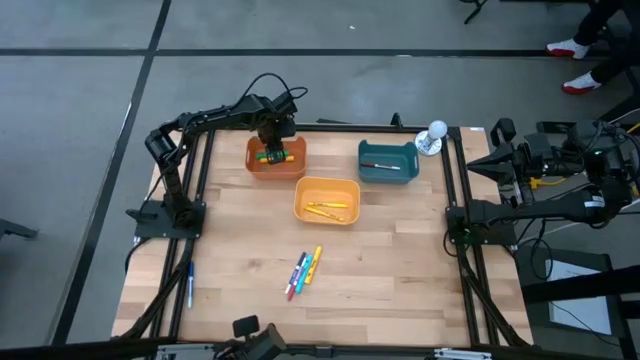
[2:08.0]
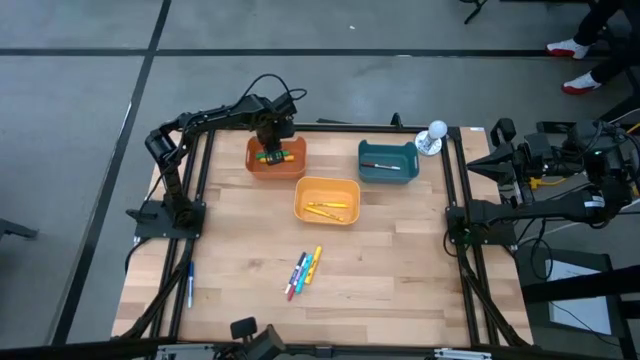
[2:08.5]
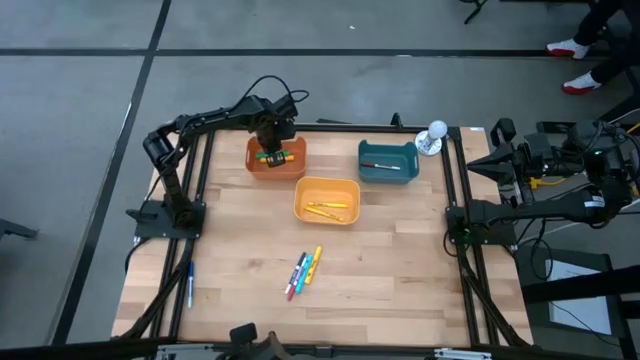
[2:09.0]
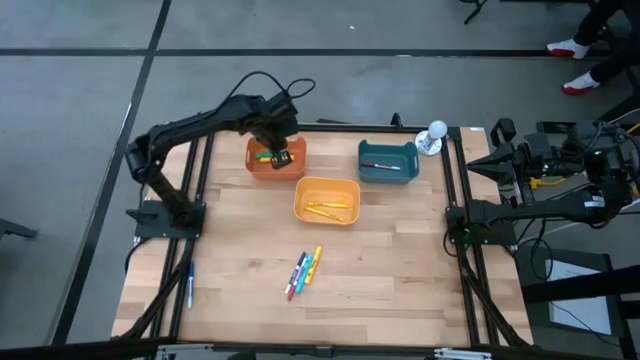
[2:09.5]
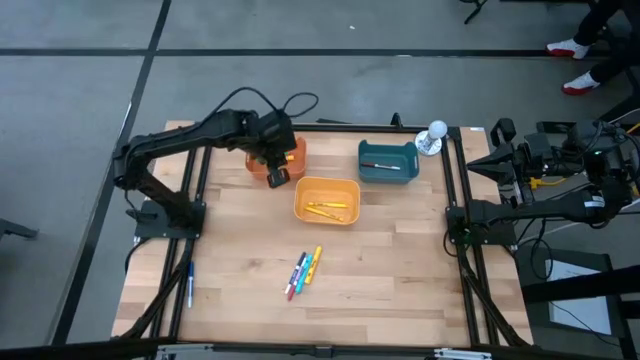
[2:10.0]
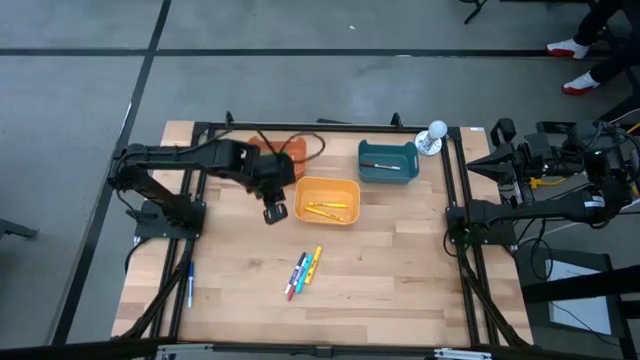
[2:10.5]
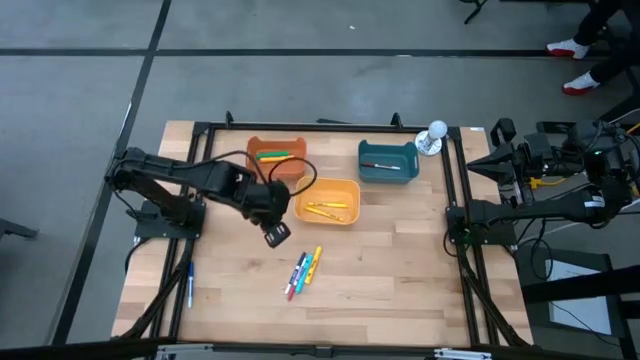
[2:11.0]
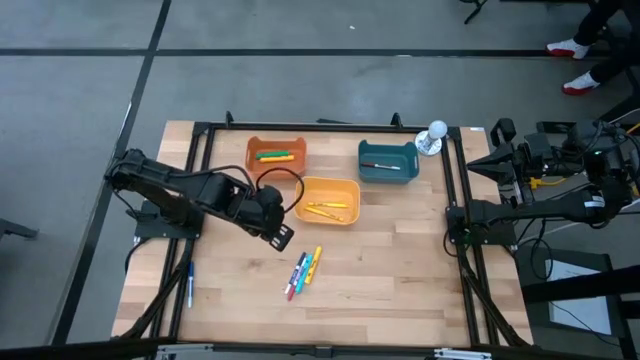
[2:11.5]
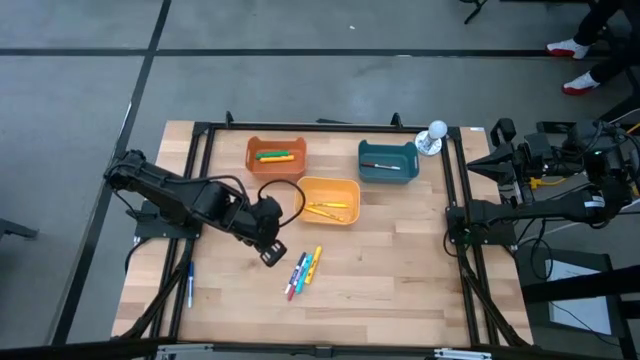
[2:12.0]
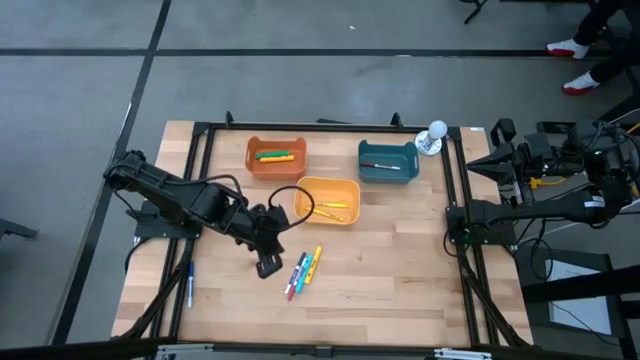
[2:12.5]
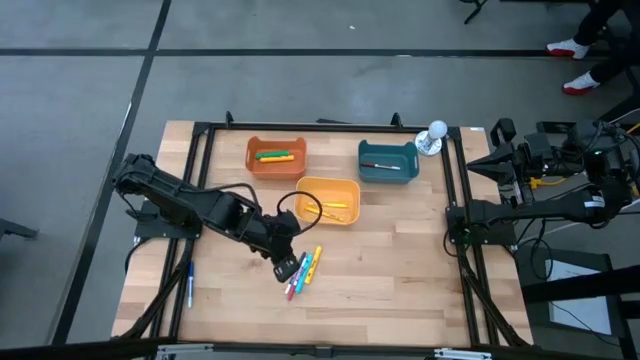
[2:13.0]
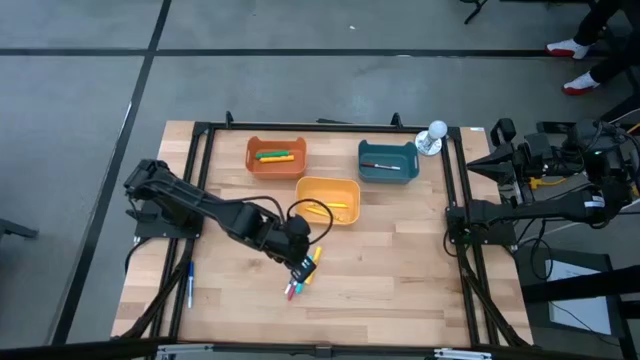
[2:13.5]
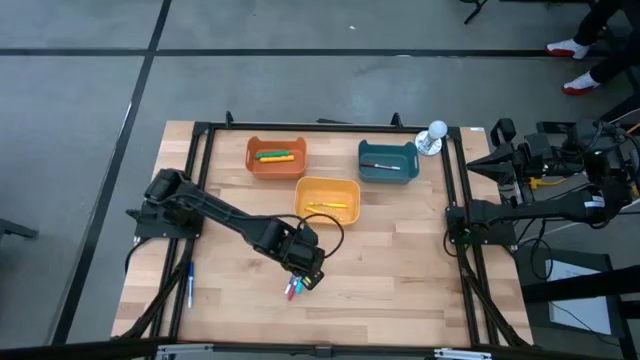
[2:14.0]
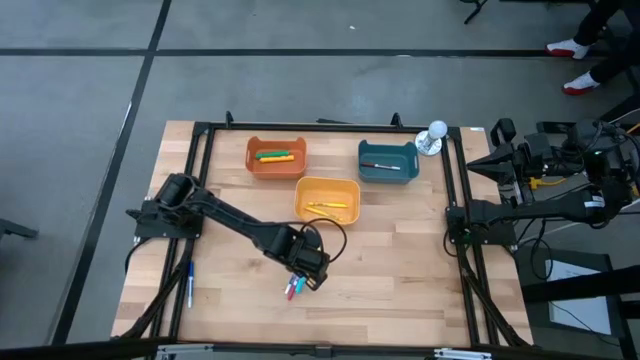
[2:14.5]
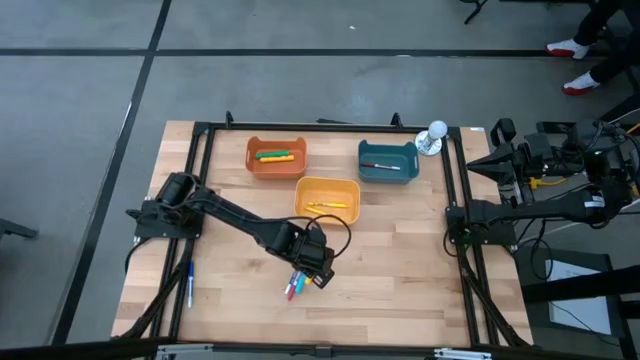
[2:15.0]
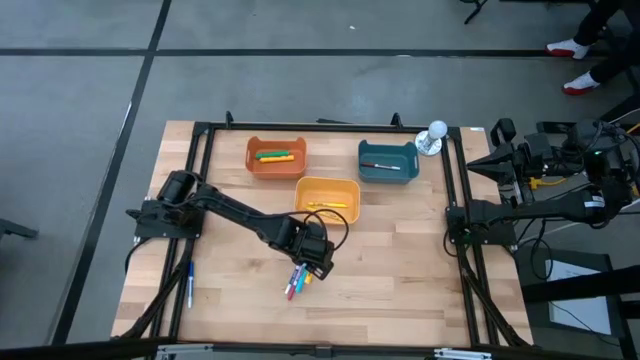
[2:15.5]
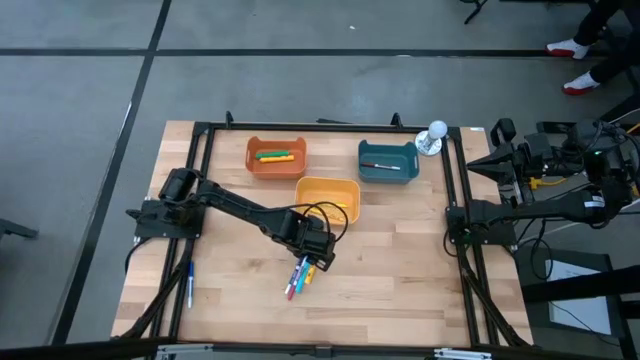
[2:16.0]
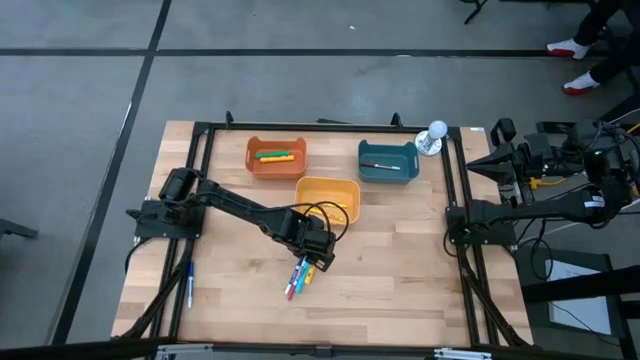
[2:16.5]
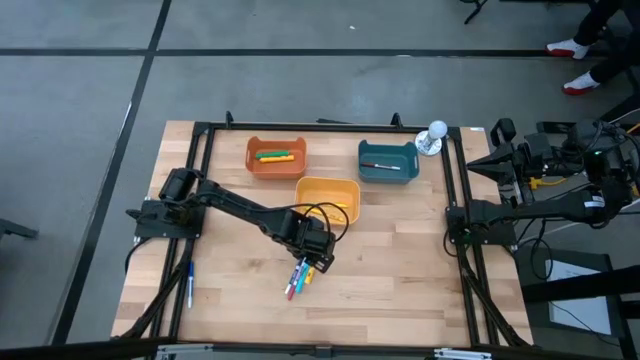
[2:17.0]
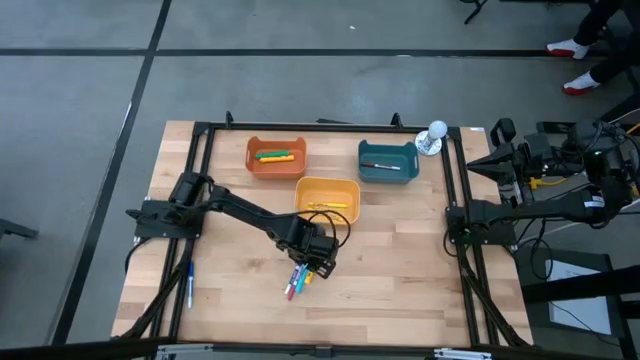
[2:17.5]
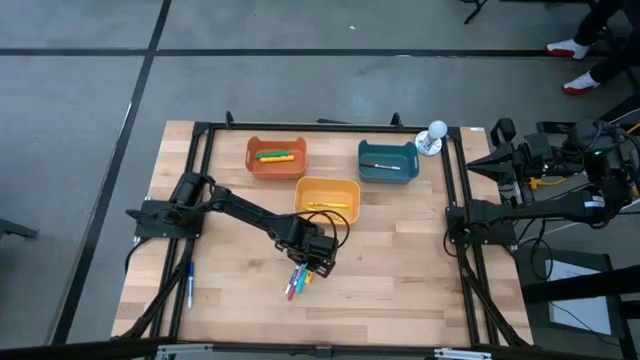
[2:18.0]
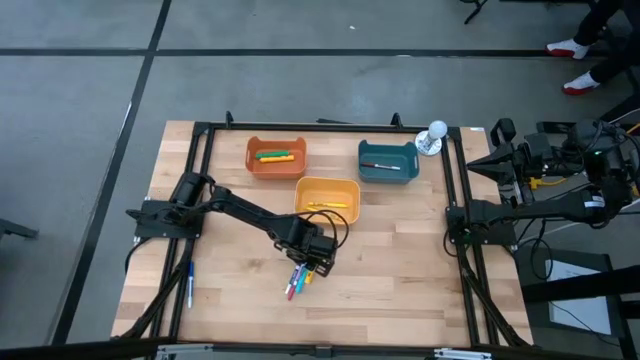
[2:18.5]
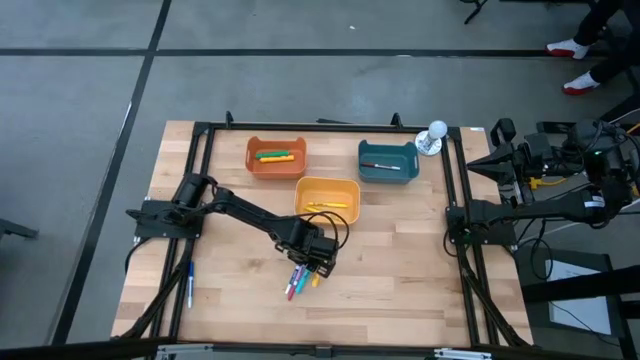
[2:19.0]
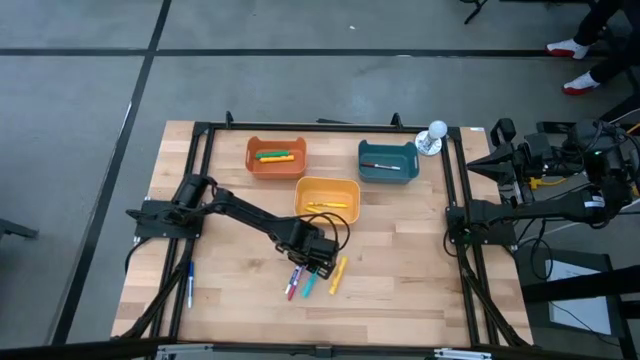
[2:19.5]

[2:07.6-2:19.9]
Task: Pick & Place Markers
Put the big light blue highlighter pen into the orange bin

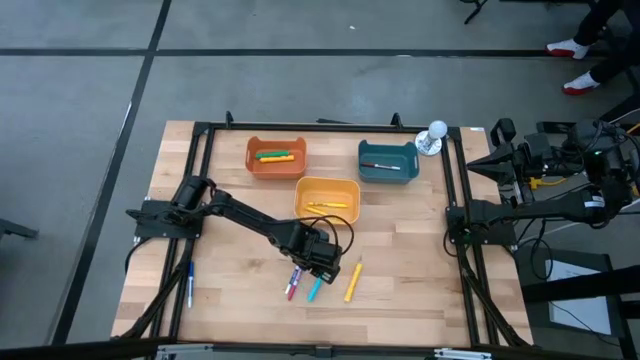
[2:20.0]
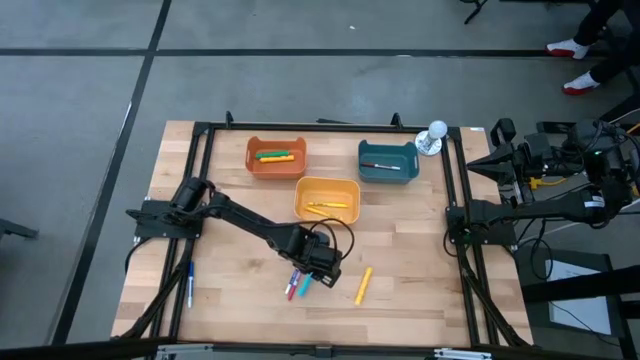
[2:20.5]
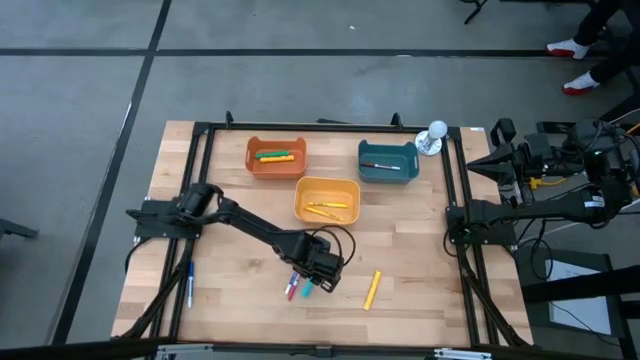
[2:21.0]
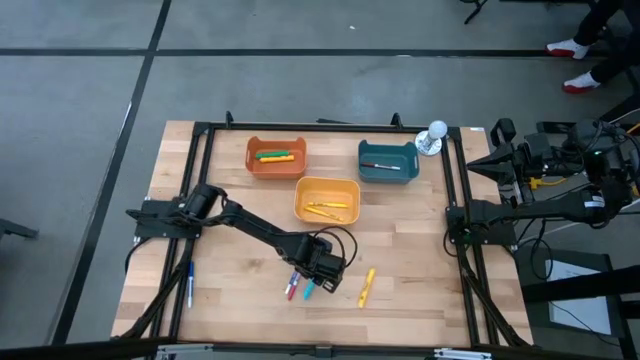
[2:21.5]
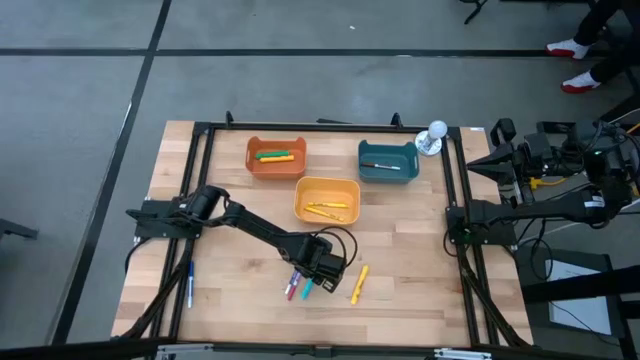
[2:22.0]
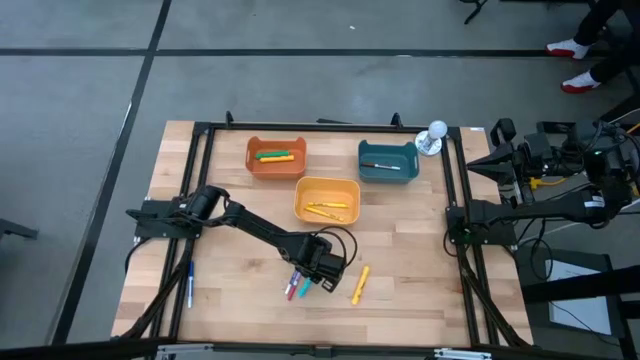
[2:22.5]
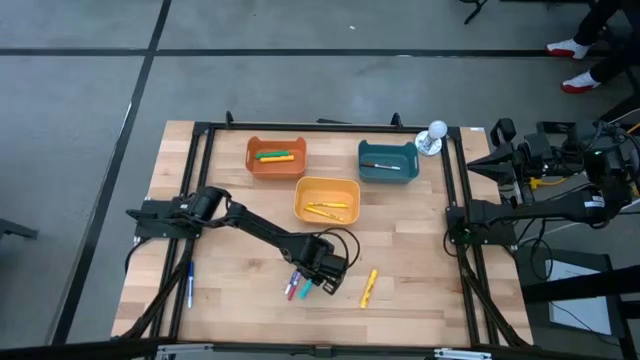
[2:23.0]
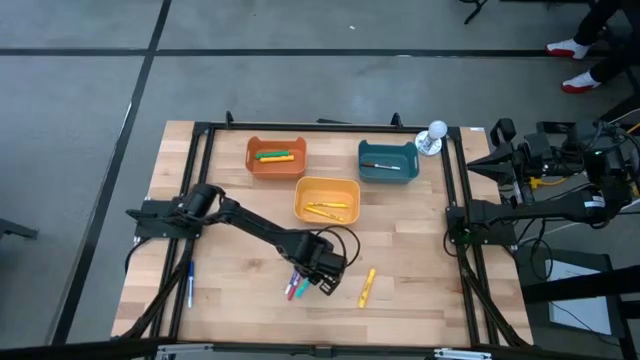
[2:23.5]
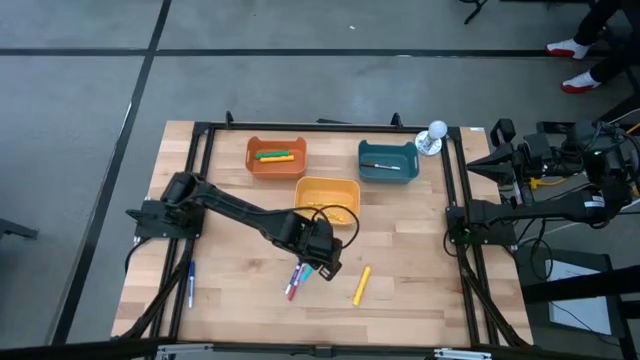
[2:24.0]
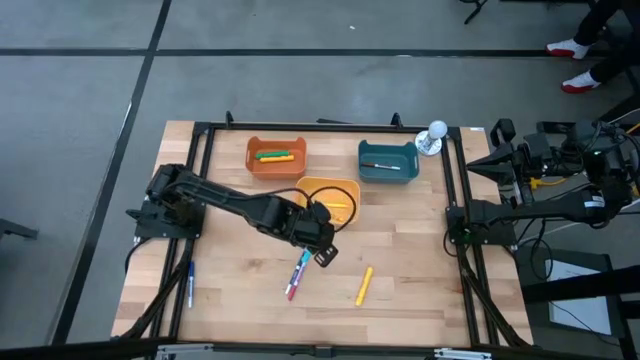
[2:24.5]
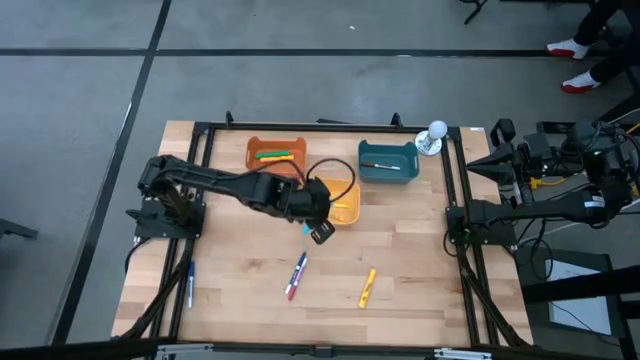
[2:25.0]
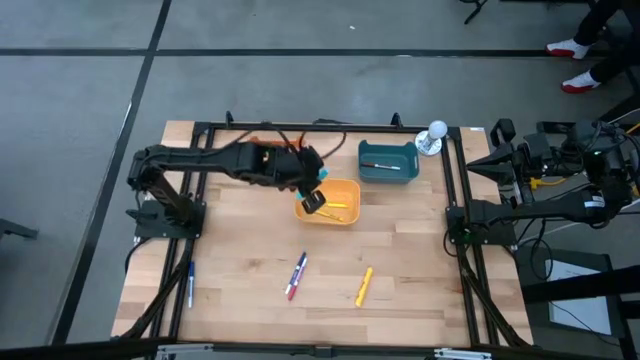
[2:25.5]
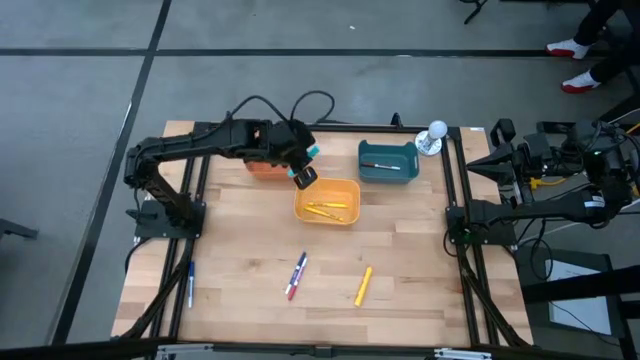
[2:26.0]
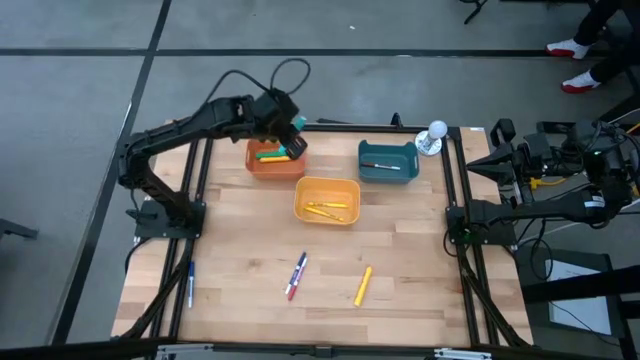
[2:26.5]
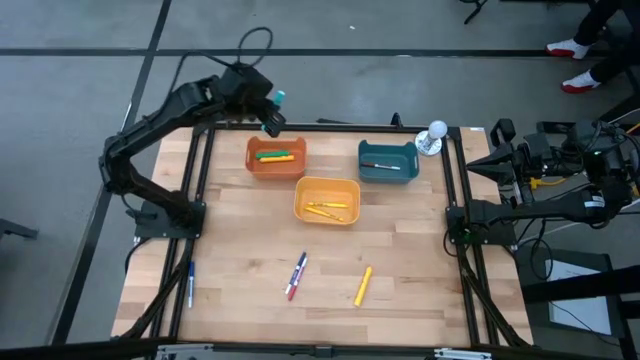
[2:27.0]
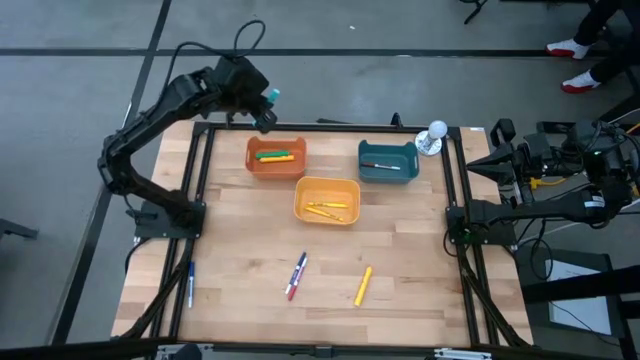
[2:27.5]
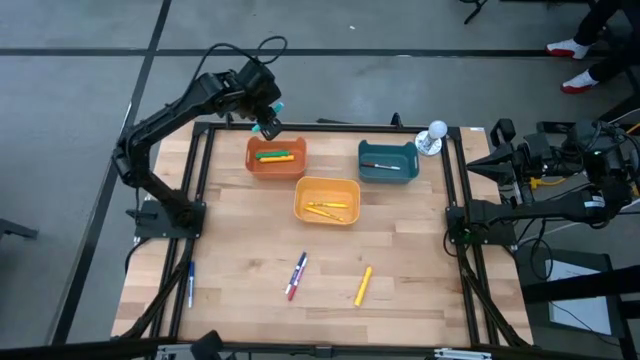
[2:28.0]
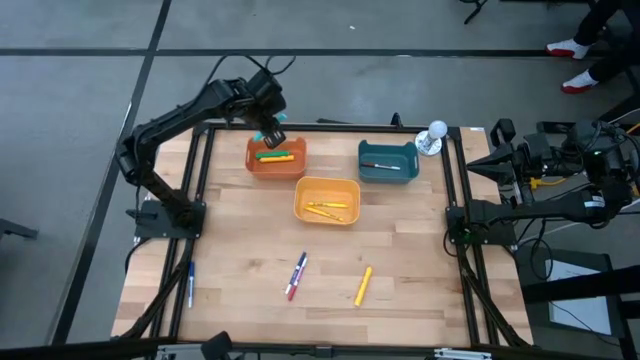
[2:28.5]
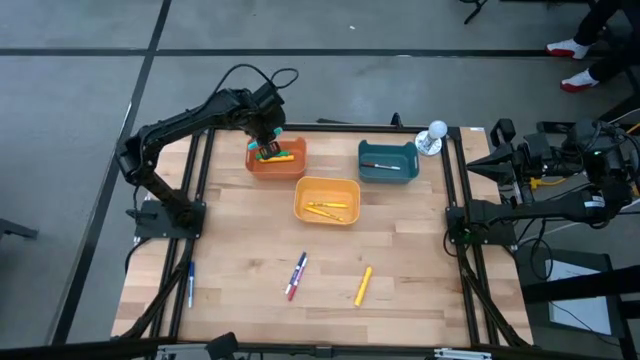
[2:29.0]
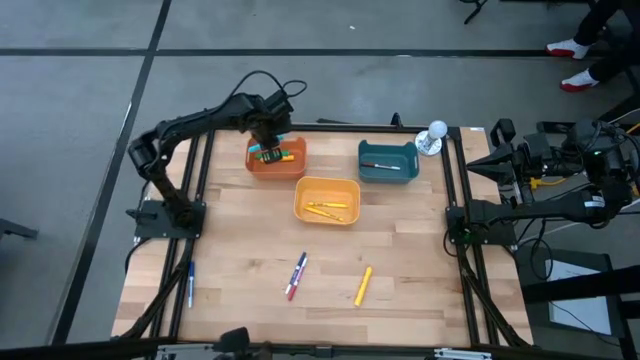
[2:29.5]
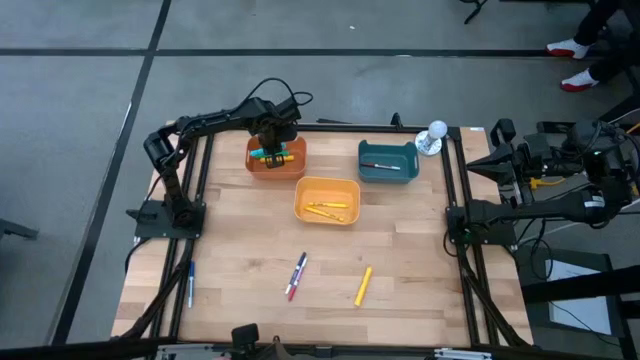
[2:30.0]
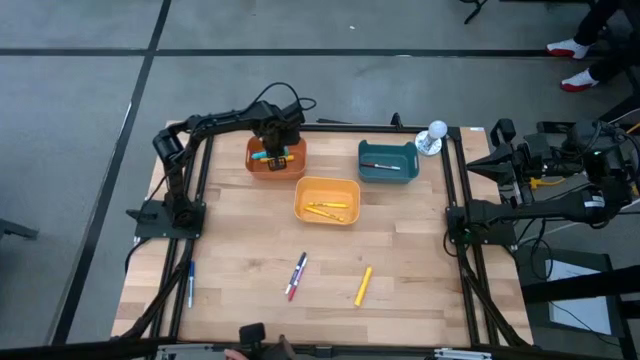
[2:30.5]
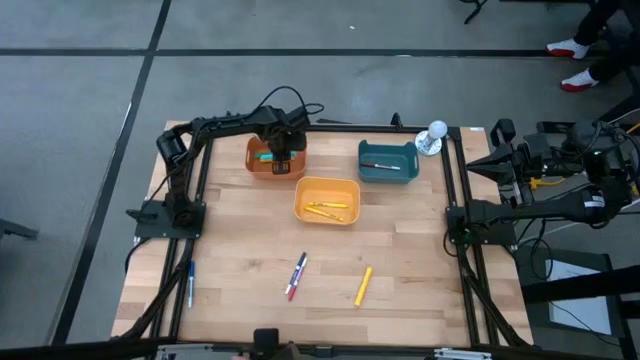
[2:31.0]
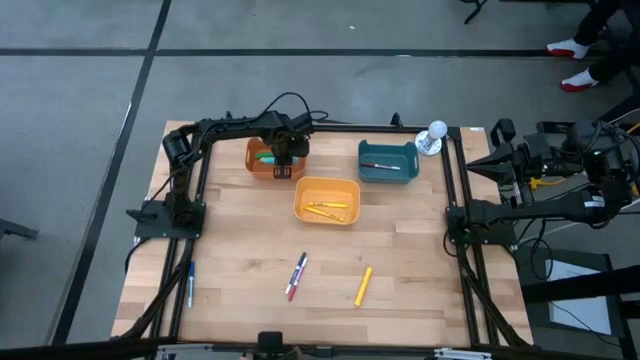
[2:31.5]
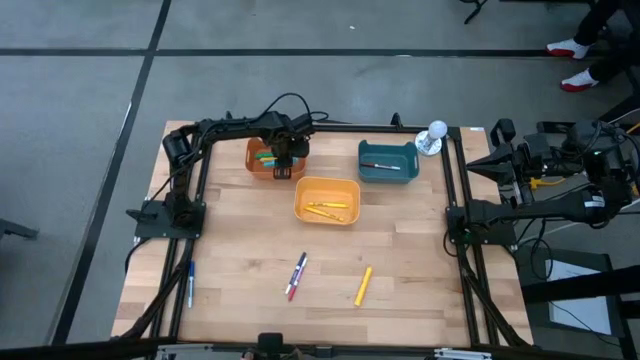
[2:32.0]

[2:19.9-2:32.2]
Put the big light blue highlighter pen into the orange bin
